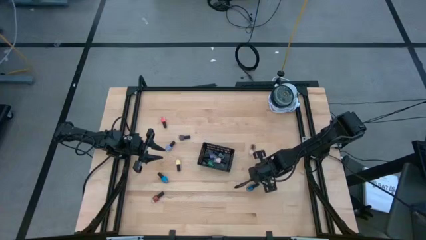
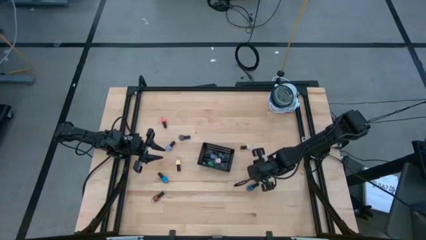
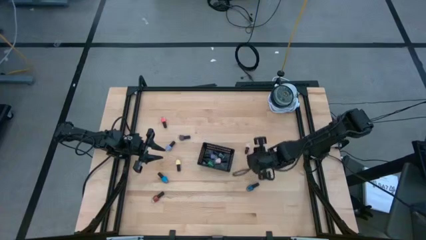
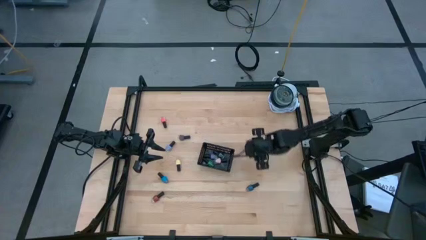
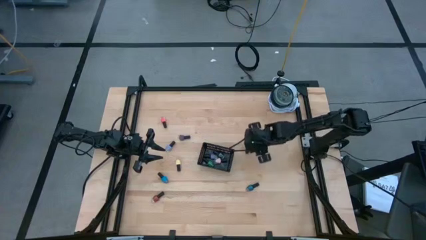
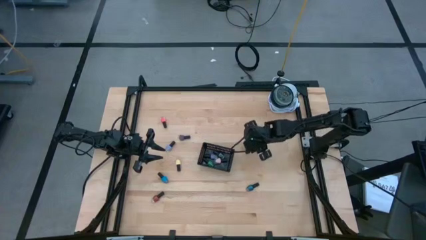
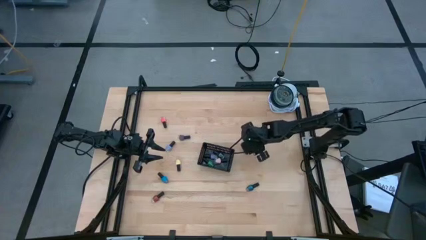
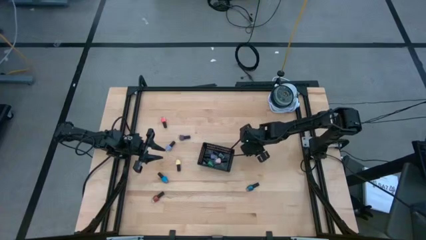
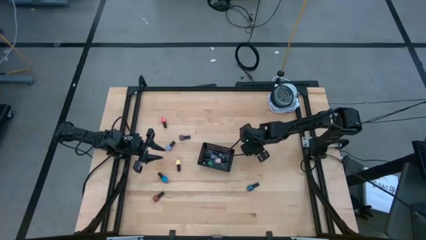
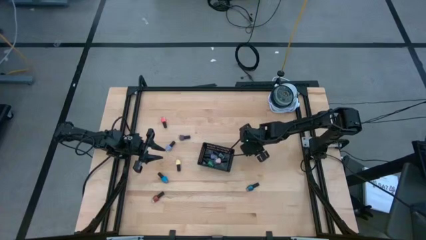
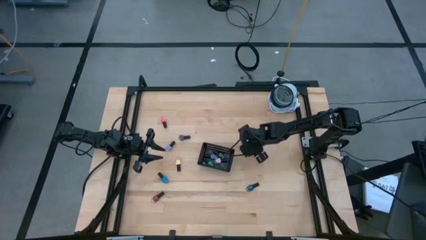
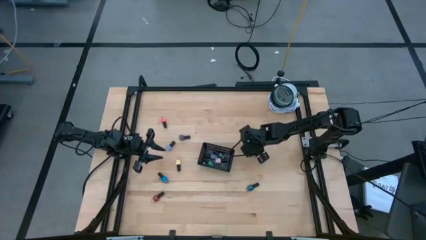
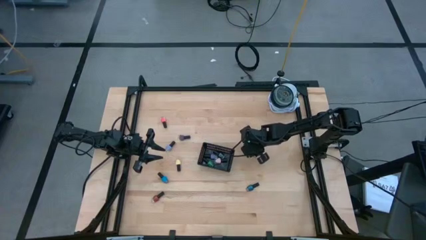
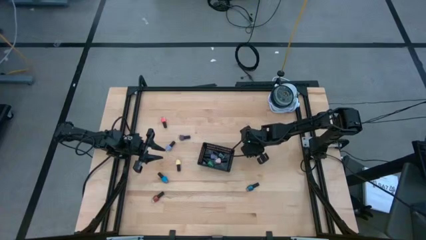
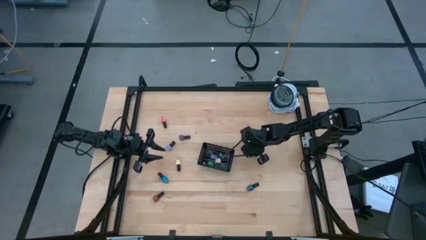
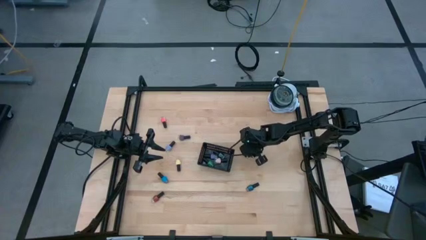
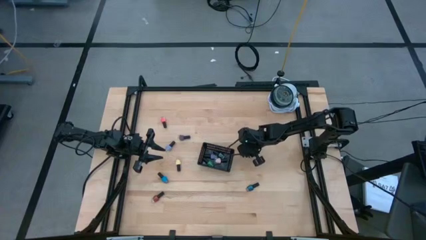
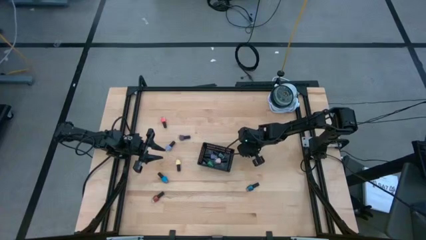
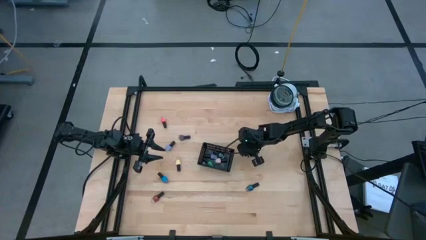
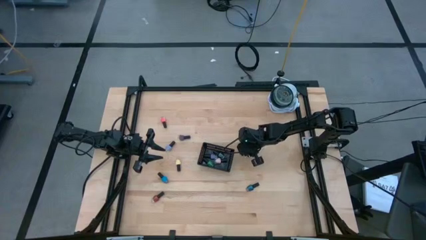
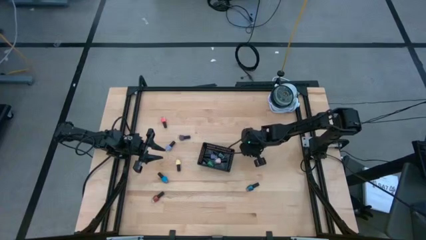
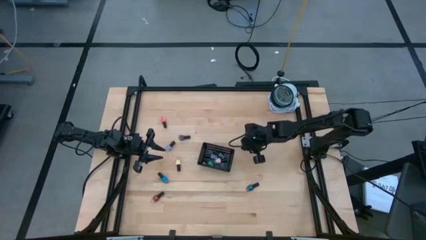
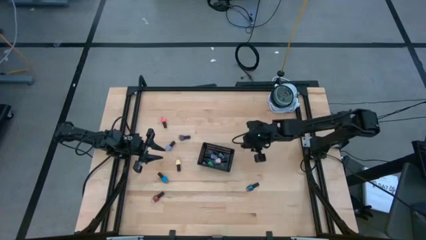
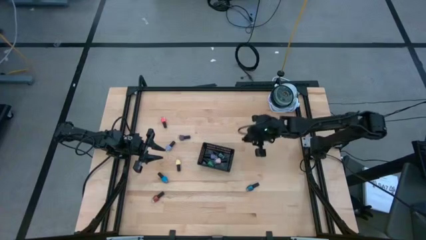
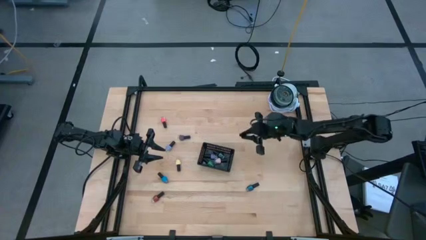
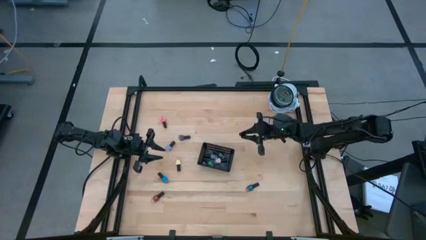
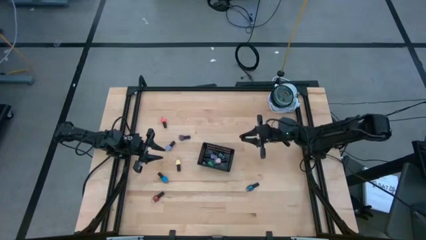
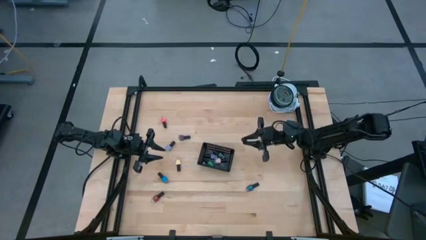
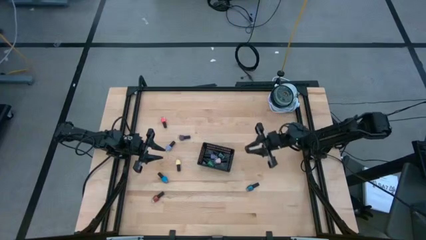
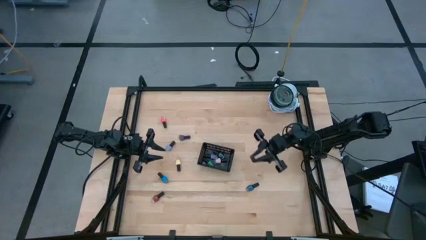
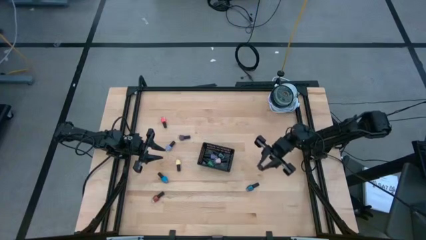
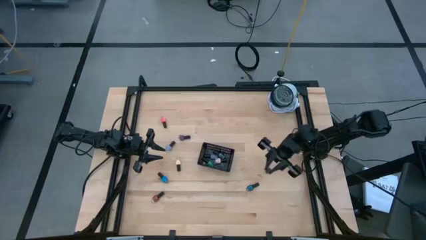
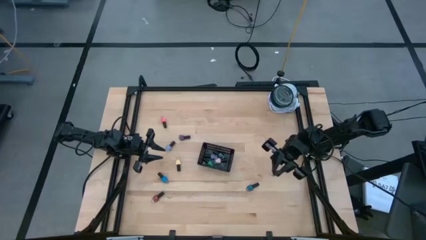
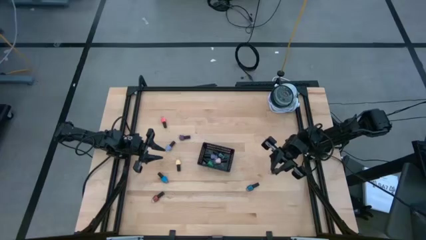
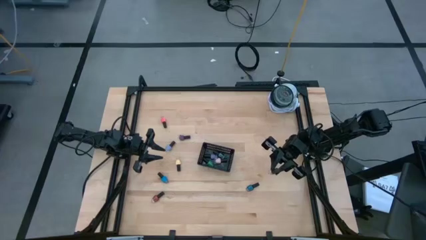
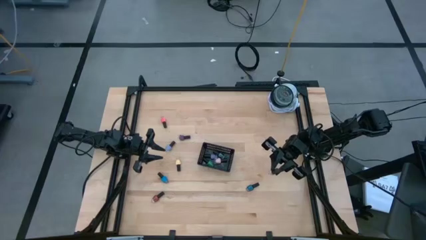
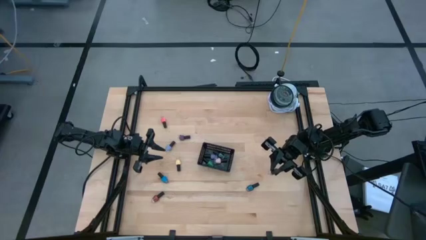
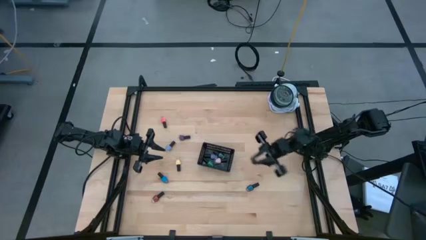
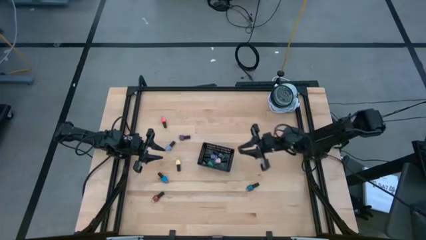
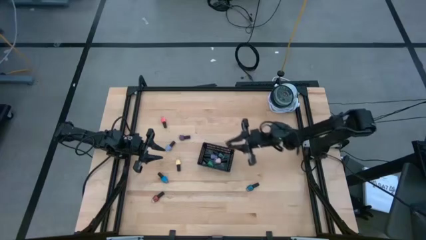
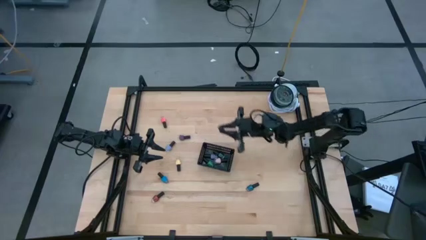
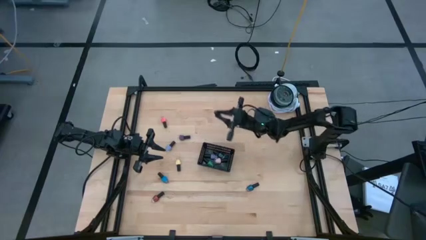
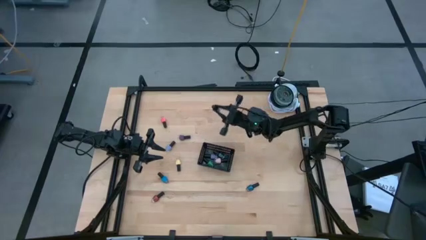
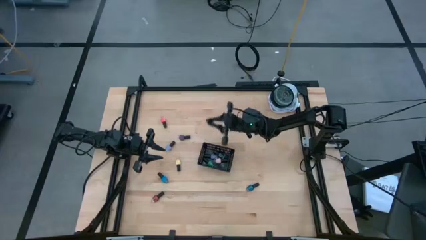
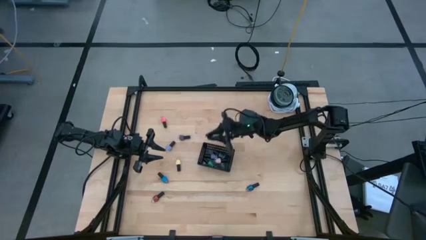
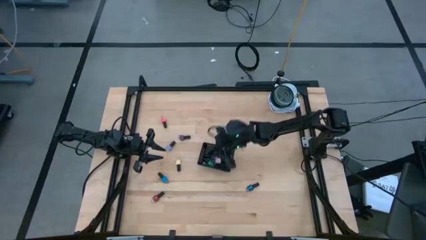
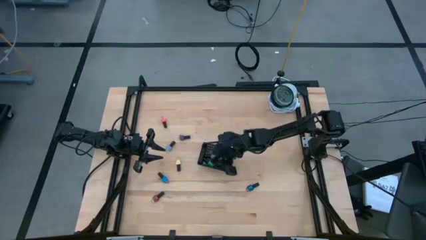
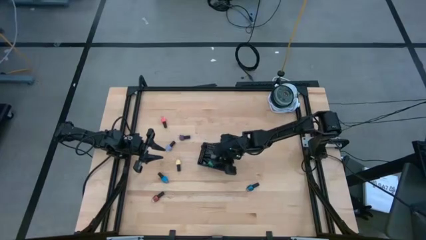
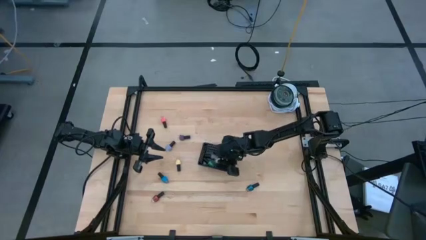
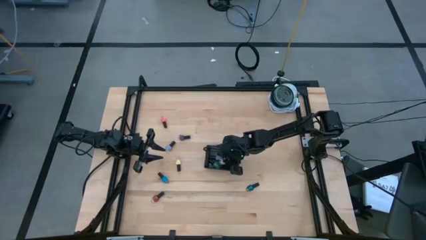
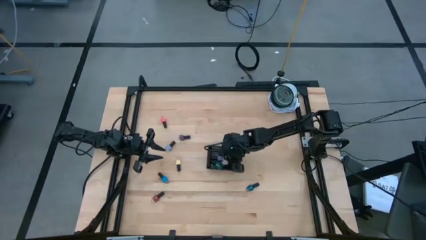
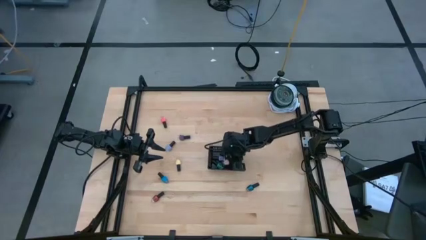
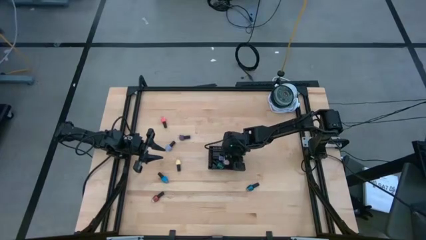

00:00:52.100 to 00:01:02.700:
Task: Pick & Place Nail Polish
Put the white nail polish into the black bin

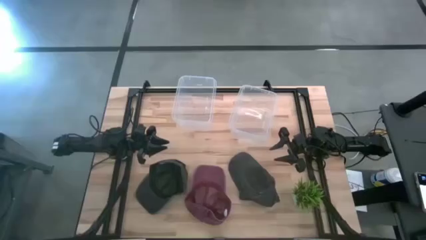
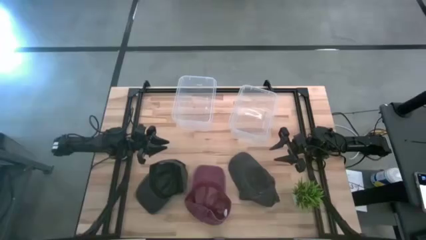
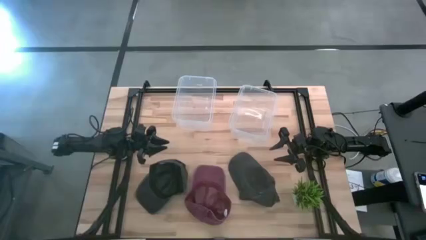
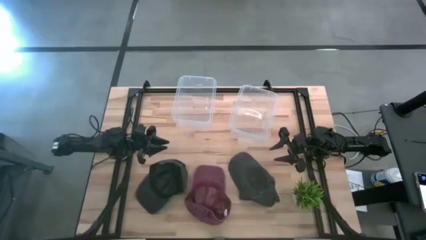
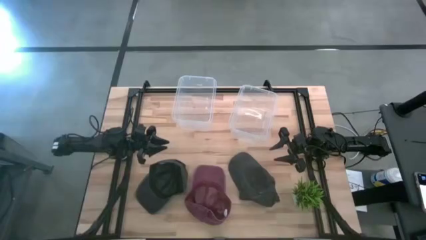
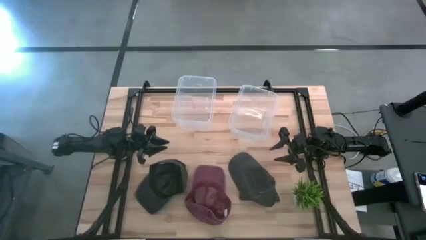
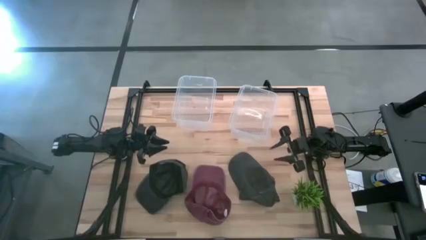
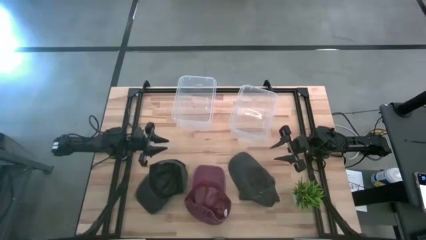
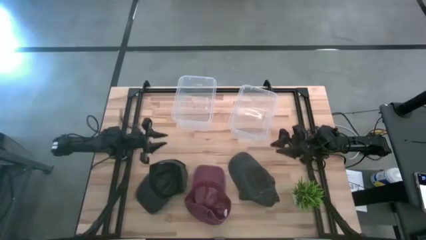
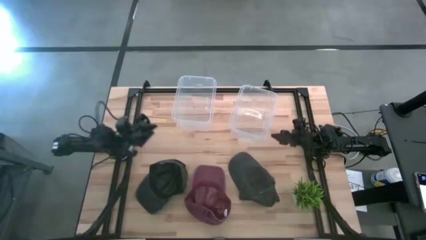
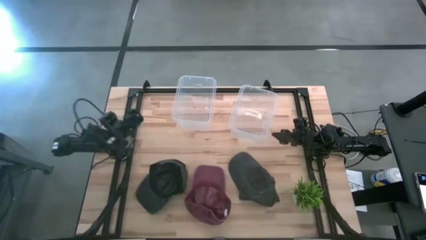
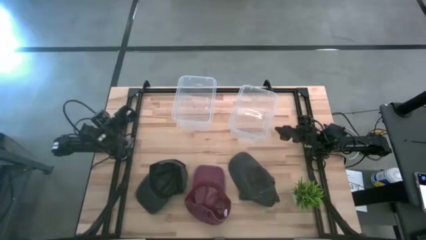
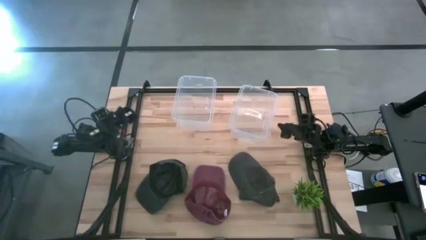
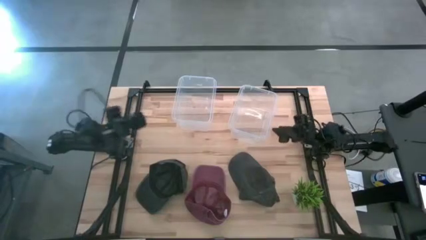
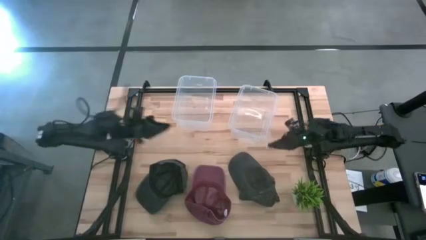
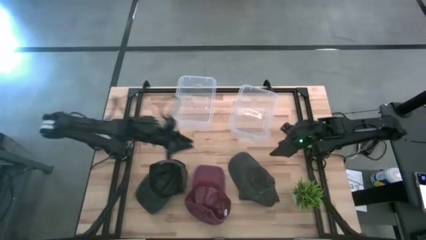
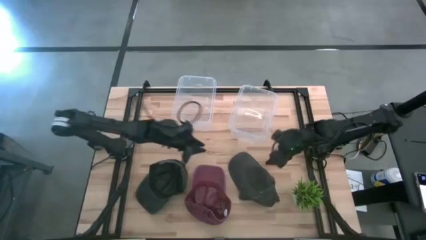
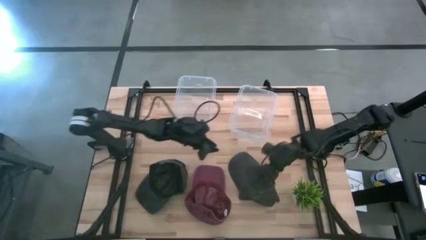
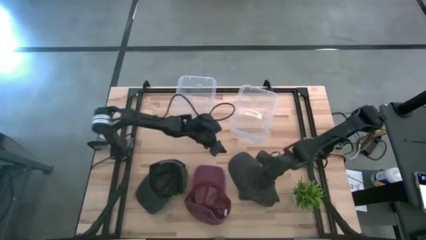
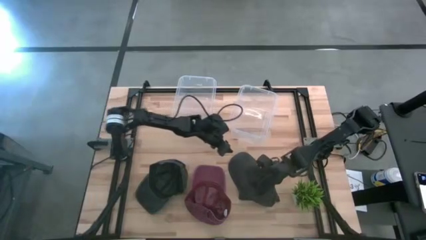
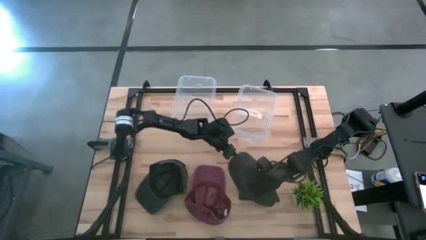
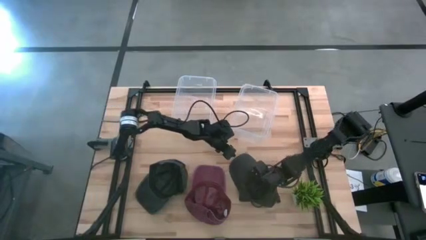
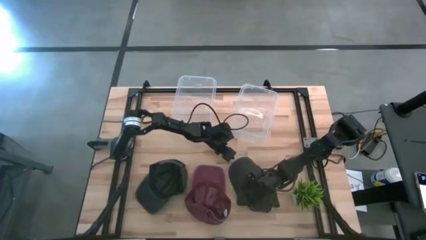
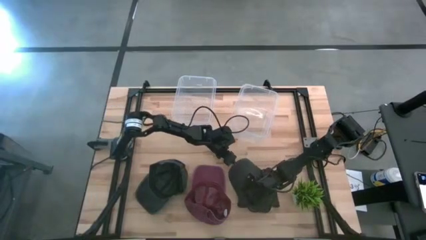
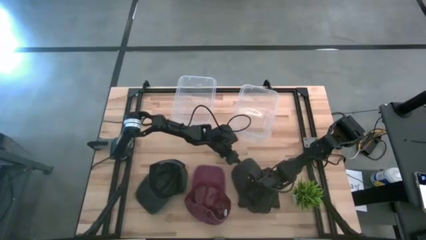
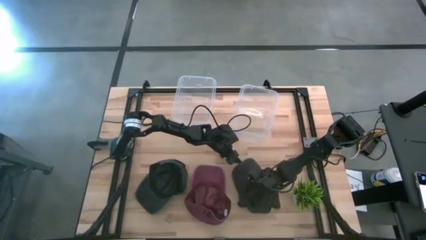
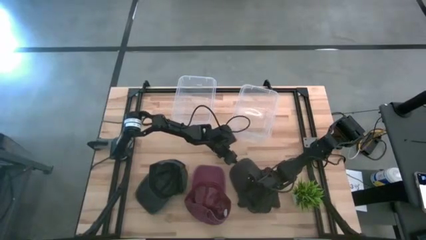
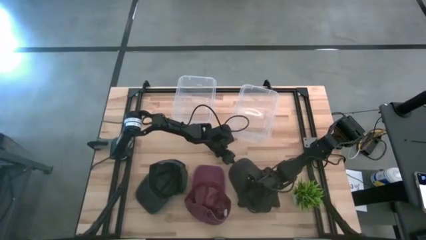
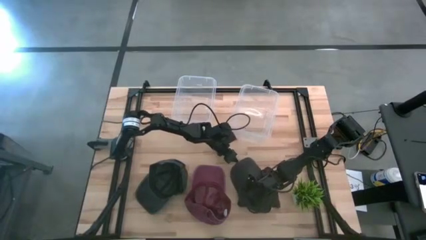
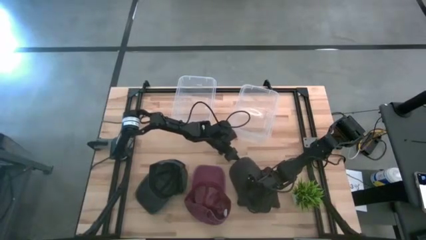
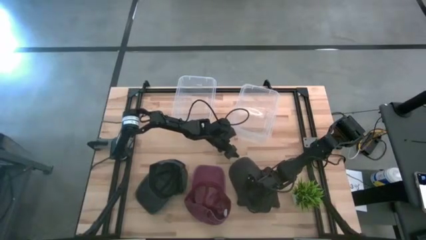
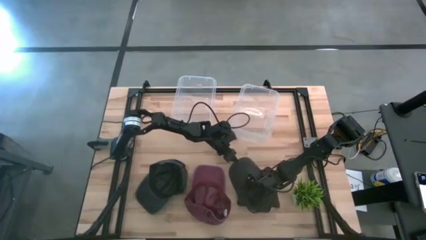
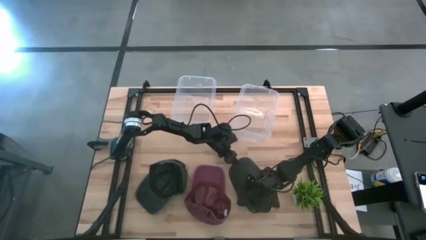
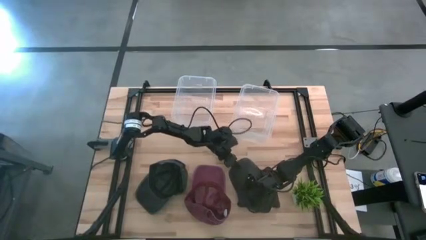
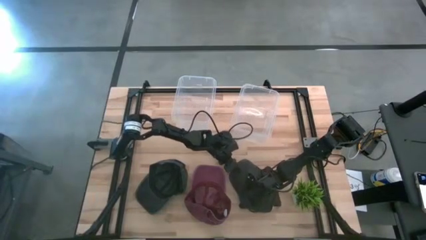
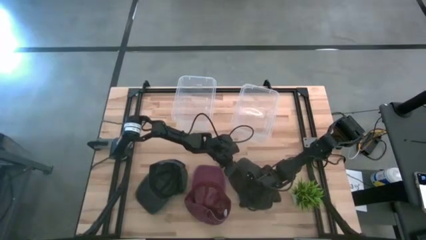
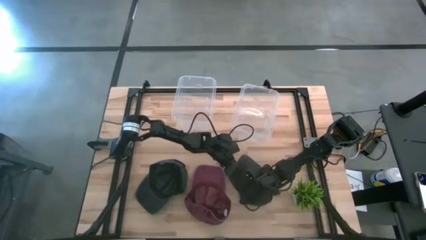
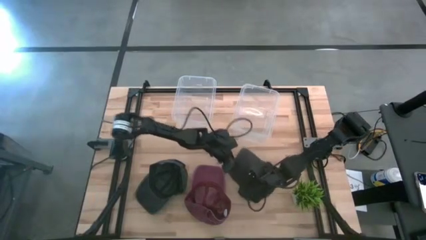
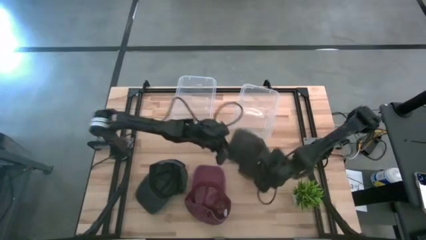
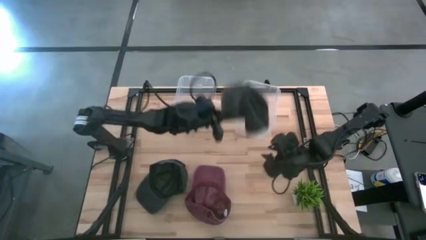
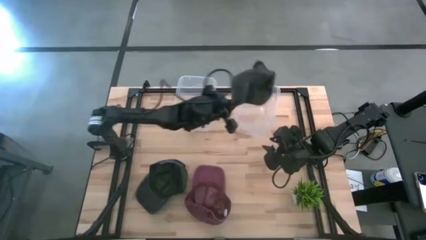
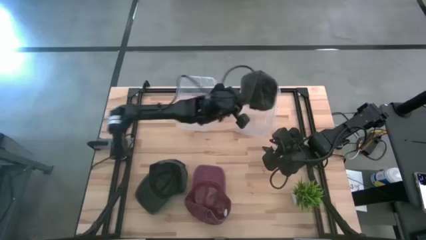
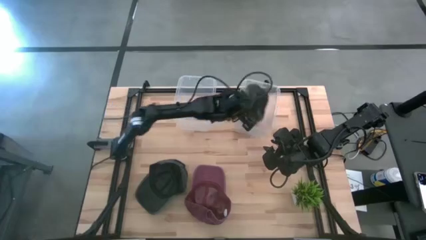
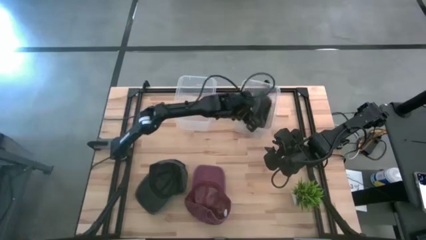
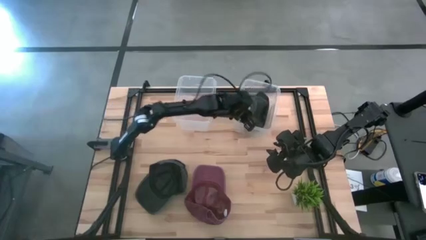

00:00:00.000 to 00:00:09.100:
Task: Pick & Place hat
Put the right black cap into the right transparent bin
